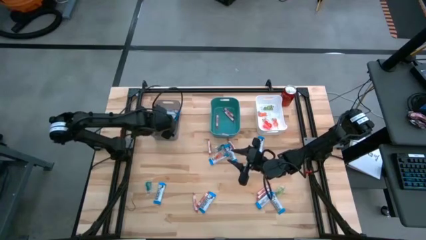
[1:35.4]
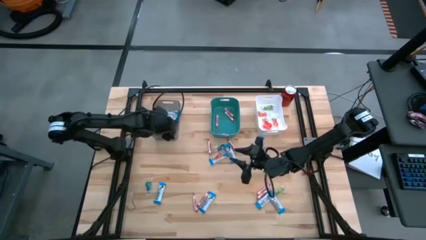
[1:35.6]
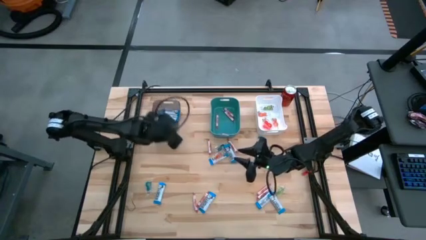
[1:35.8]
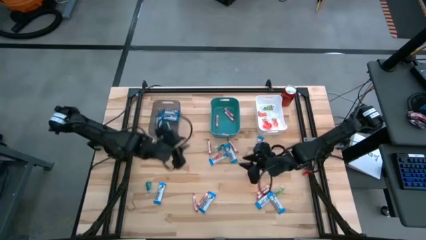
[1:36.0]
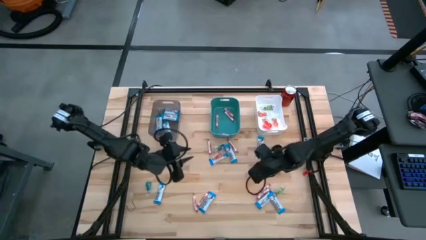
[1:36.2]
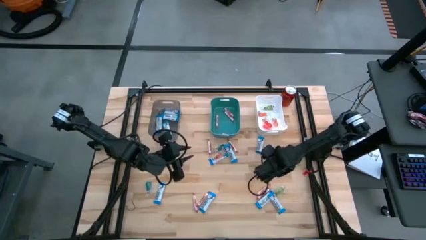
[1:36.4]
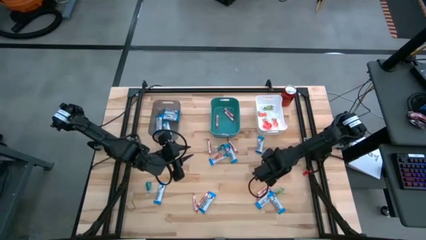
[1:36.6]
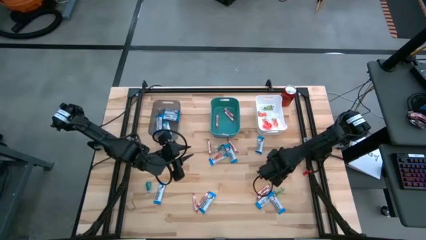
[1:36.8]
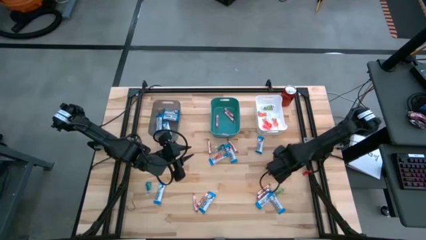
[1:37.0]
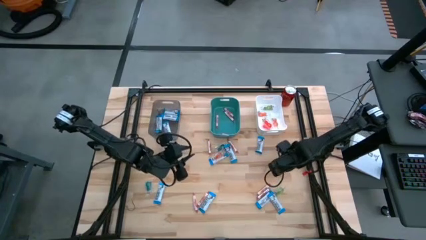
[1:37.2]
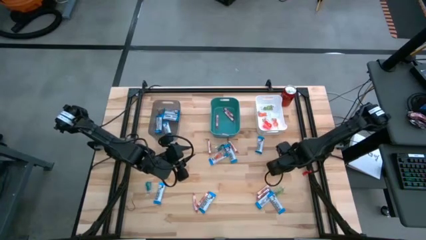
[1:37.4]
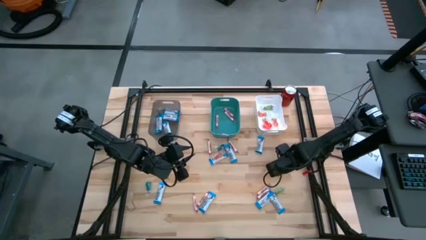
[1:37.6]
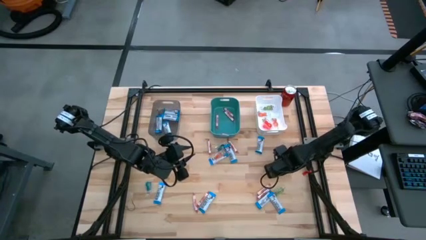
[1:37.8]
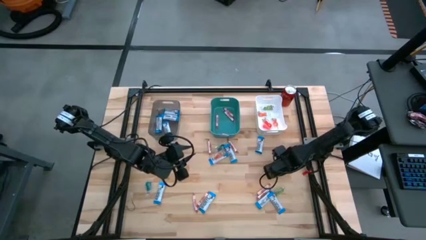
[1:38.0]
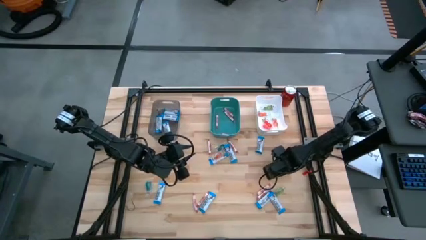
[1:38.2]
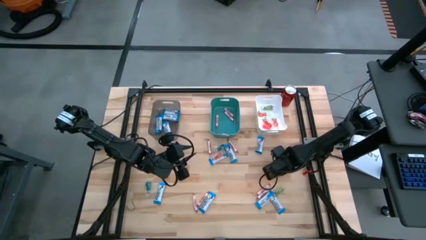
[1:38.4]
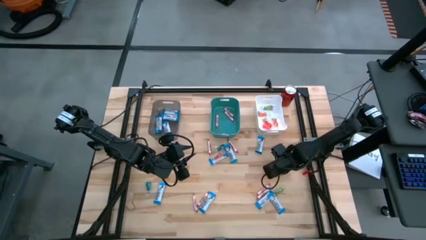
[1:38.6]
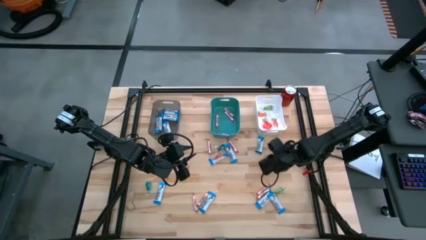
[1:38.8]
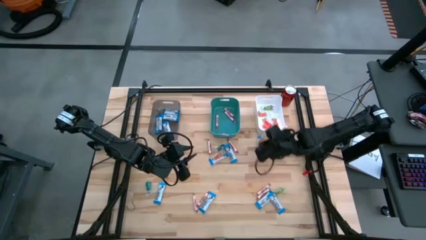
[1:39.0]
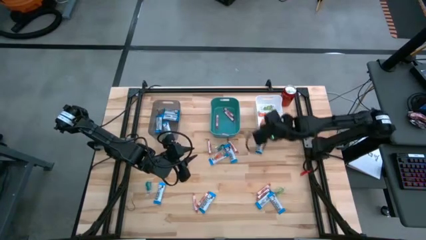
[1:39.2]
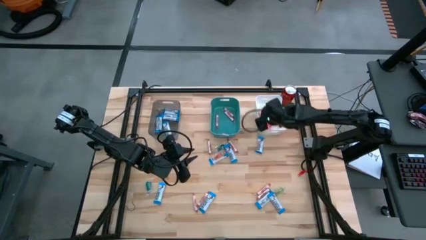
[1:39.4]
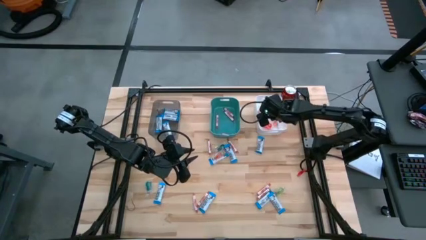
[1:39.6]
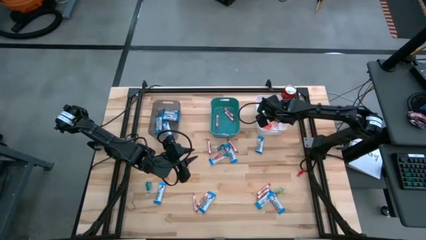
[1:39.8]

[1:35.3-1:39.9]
Task: Sort candy
Put the orange gummy into the white bin

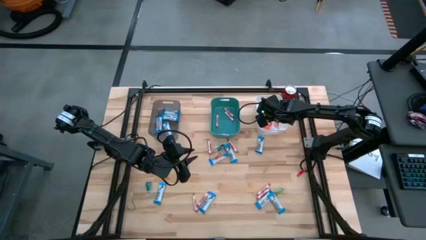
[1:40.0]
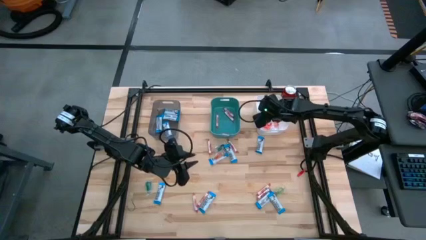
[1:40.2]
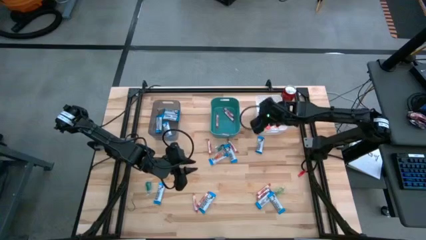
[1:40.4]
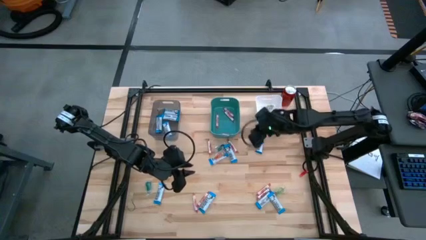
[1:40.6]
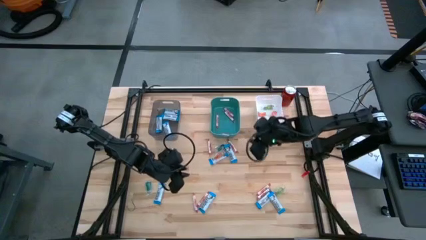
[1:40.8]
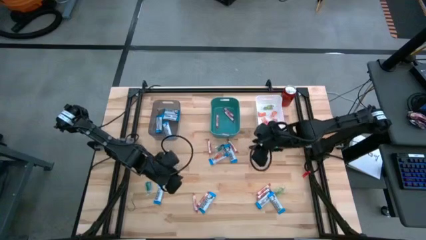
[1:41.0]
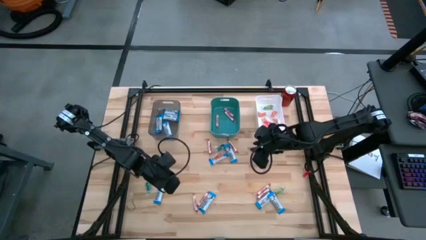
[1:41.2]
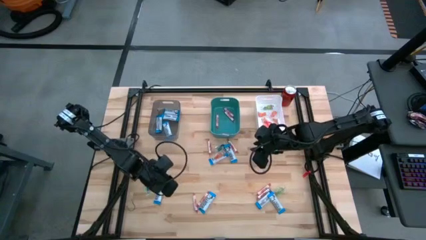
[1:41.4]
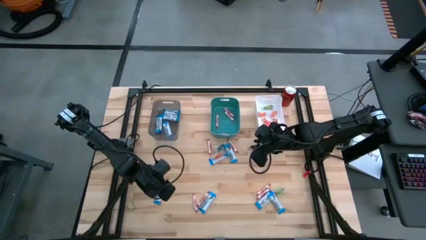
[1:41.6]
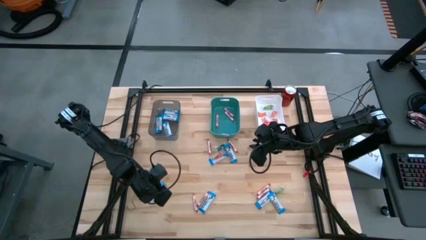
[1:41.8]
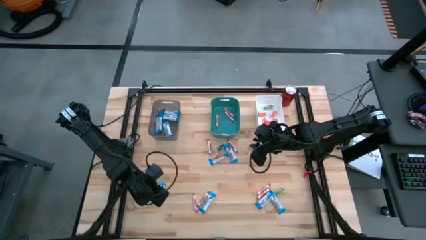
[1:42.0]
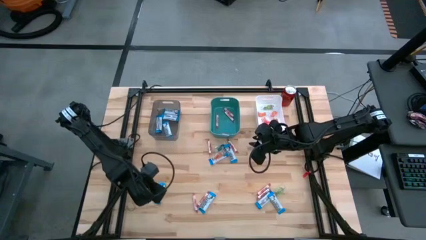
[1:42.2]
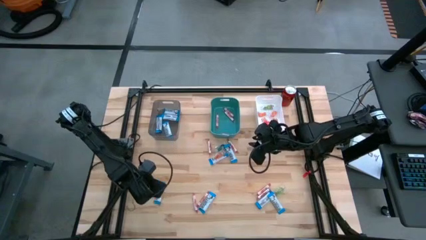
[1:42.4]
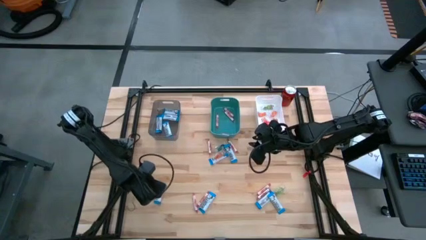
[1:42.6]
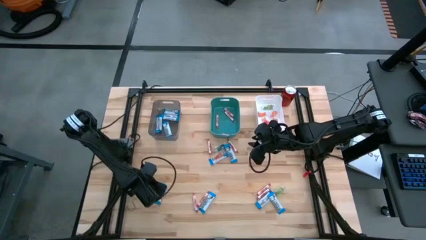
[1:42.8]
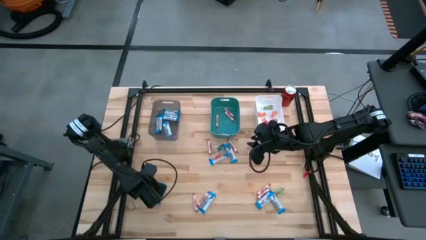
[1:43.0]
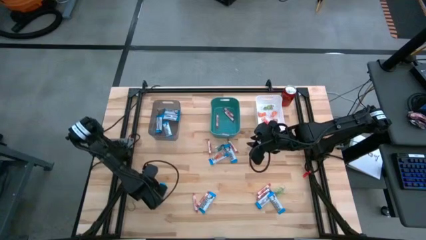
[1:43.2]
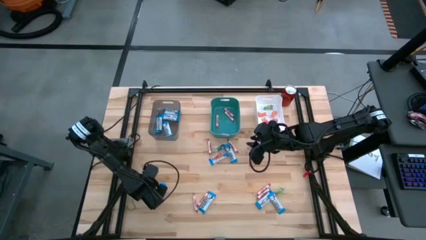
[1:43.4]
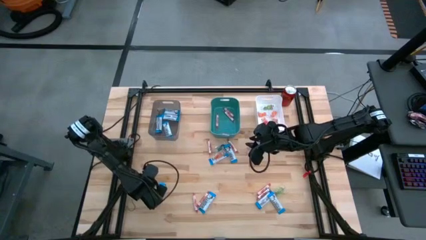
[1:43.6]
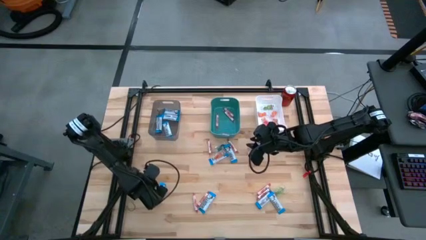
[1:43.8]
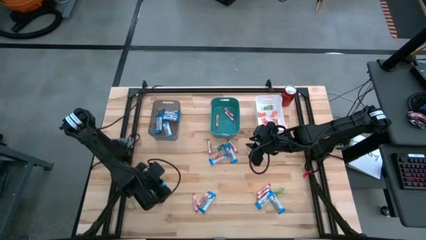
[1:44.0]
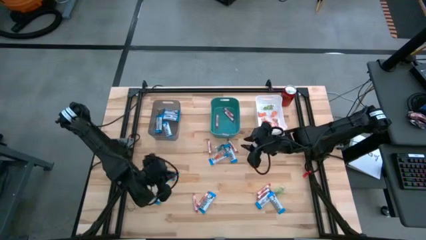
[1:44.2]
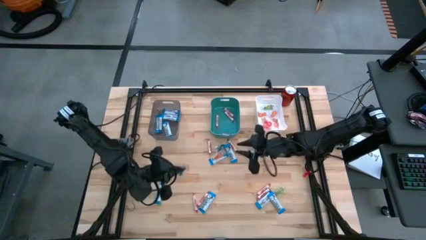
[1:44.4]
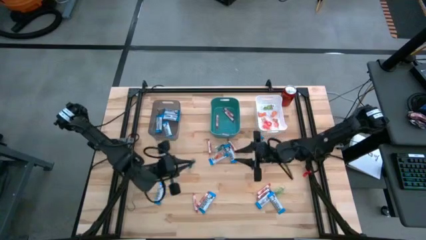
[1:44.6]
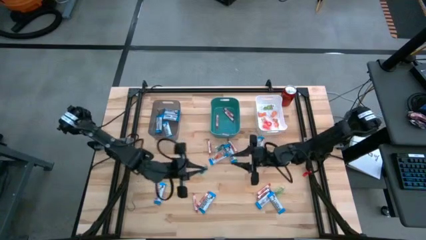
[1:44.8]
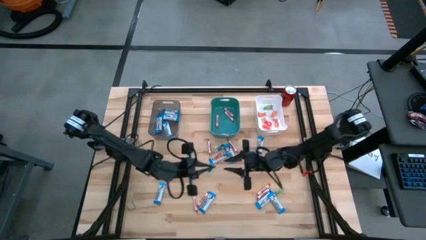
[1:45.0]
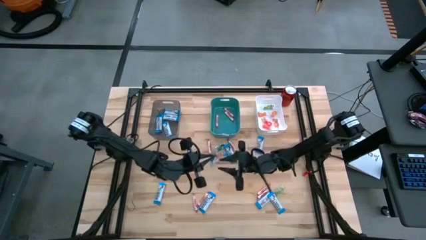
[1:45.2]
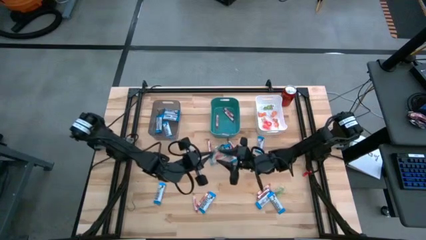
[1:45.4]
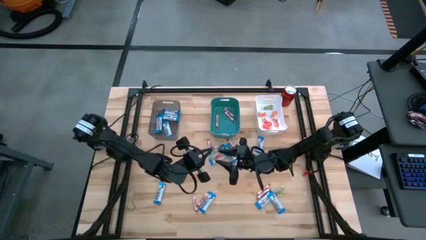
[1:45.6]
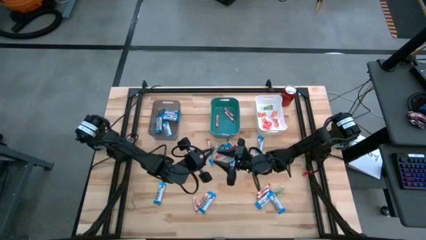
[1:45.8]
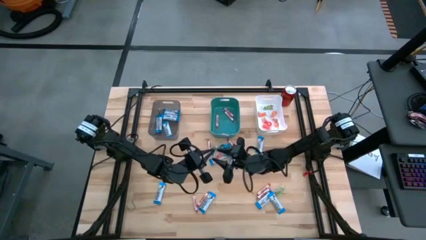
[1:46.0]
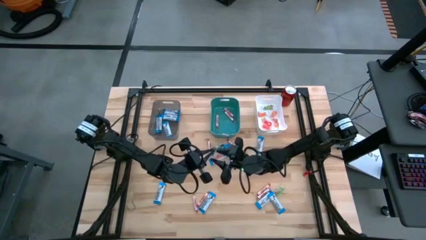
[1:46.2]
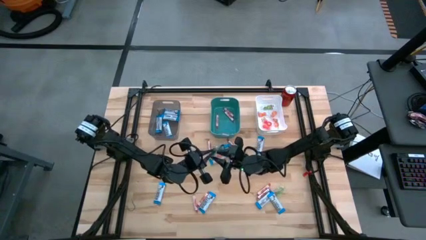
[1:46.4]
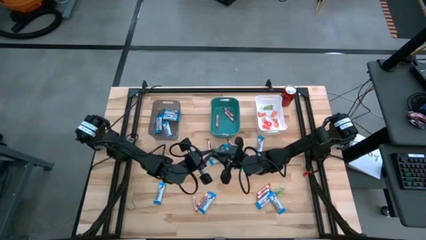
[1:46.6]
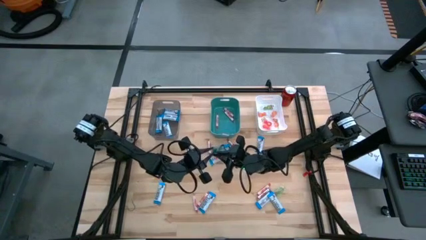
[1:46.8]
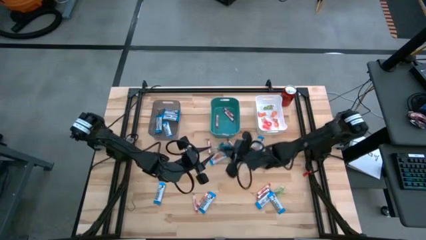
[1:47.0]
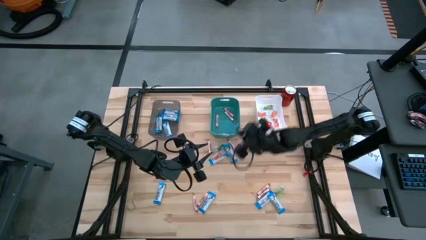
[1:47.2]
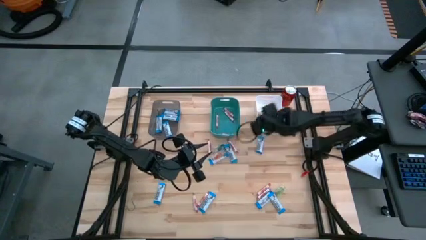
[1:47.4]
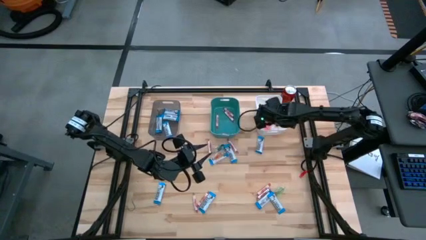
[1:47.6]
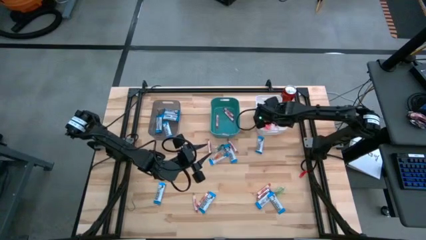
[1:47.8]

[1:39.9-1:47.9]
Put the blue gummy into the white bin

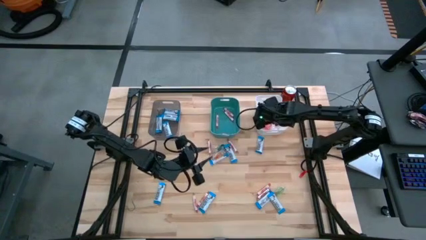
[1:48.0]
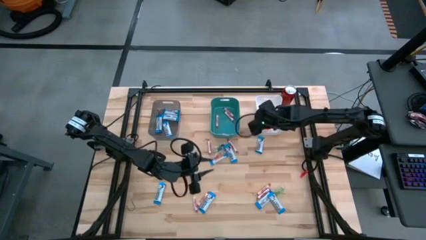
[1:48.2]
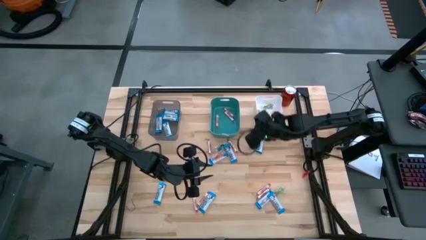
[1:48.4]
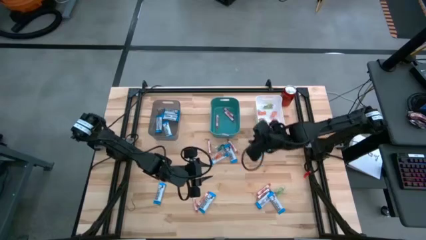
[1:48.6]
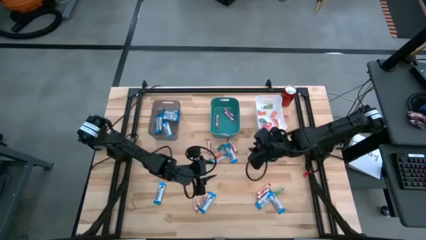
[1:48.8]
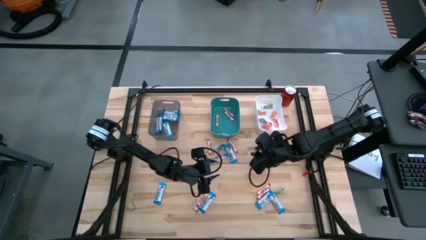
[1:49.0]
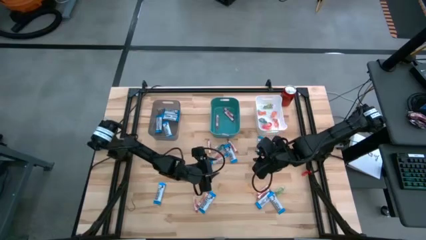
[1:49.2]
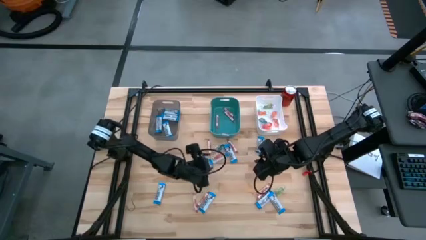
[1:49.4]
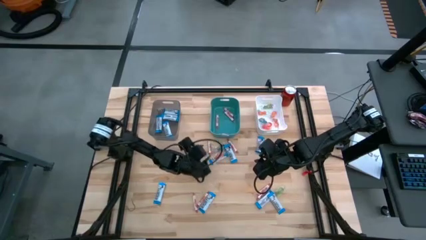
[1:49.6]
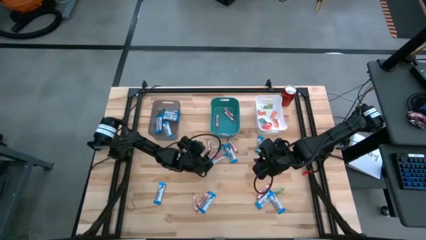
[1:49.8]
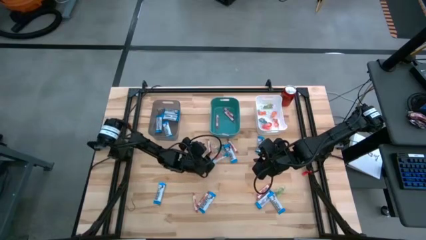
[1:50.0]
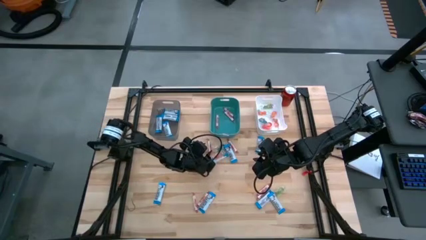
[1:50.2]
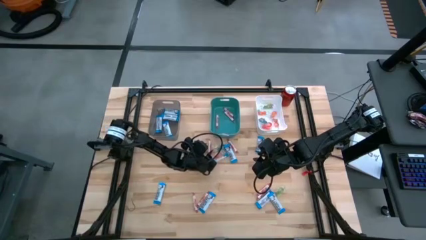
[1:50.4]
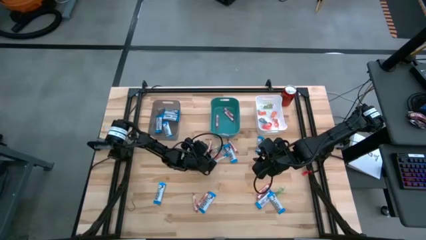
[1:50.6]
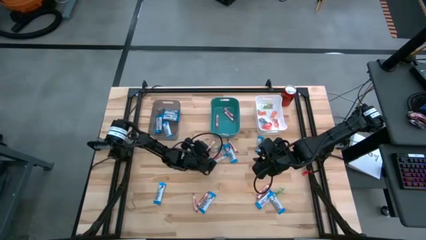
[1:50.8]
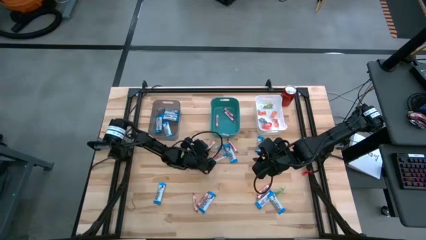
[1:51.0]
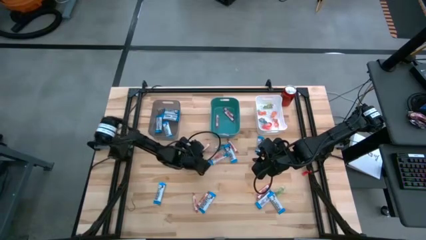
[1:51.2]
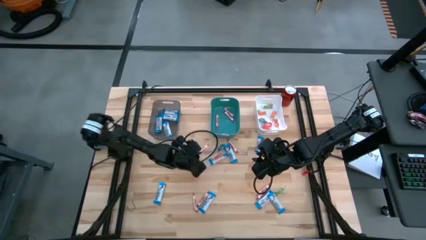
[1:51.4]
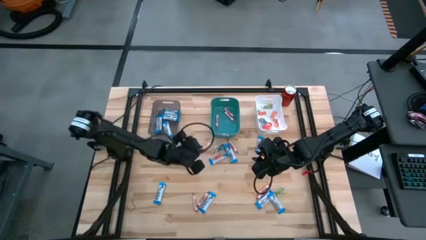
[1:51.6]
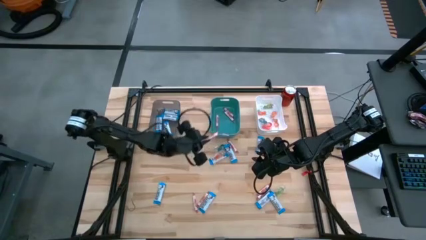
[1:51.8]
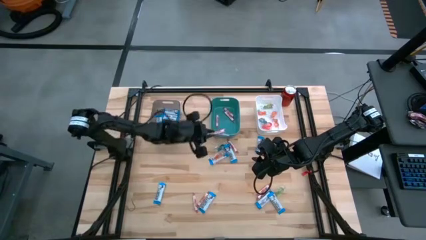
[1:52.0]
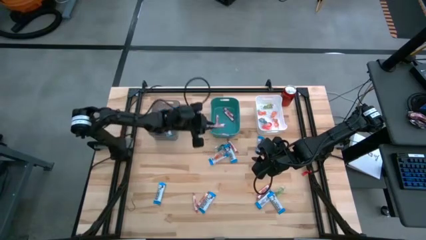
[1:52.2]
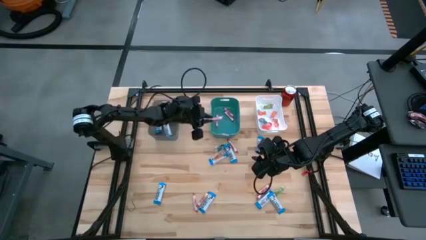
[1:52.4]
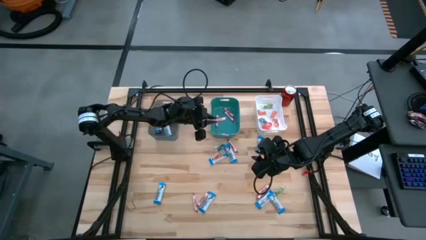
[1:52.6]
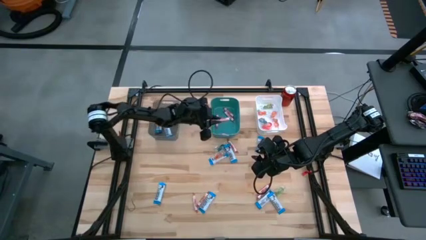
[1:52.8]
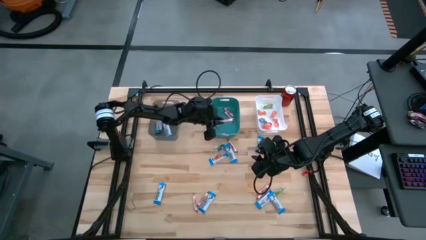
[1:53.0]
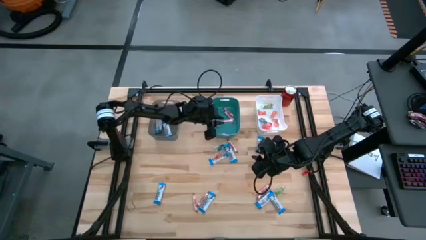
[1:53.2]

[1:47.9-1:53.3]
Put the red candy into the blue bin
